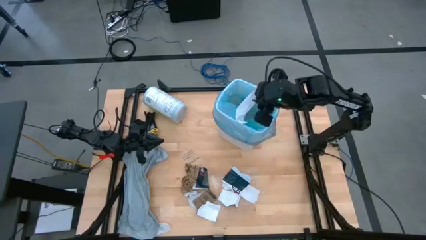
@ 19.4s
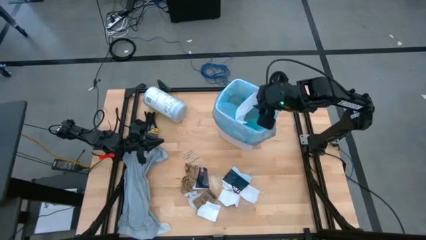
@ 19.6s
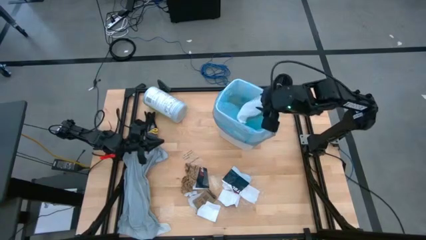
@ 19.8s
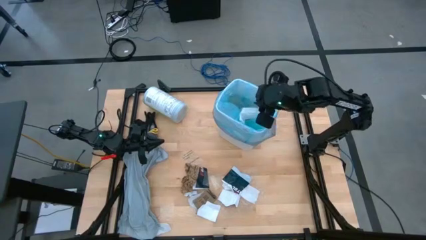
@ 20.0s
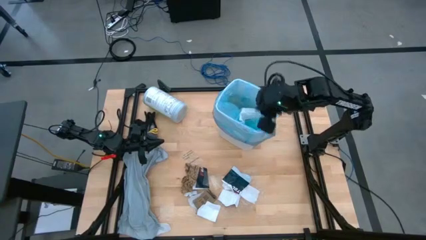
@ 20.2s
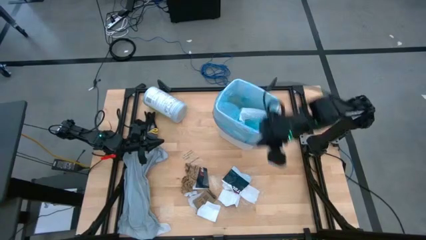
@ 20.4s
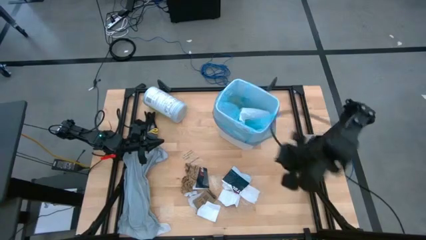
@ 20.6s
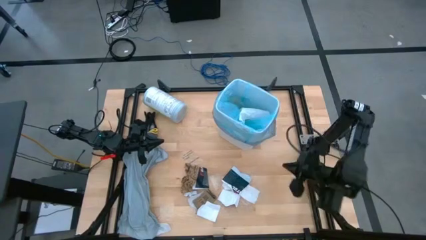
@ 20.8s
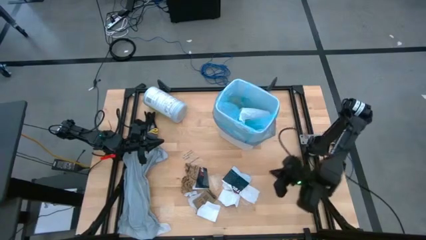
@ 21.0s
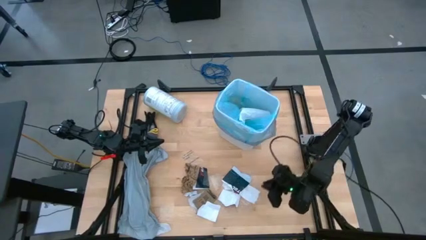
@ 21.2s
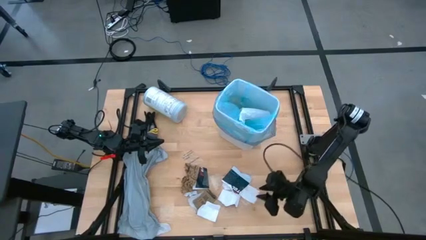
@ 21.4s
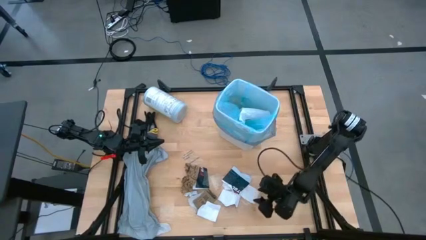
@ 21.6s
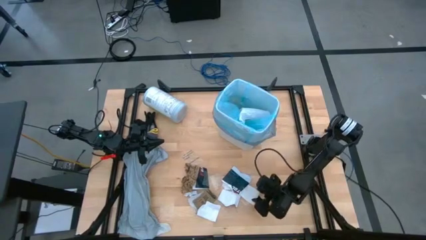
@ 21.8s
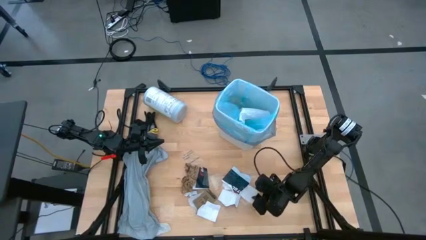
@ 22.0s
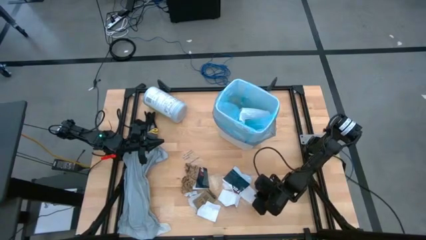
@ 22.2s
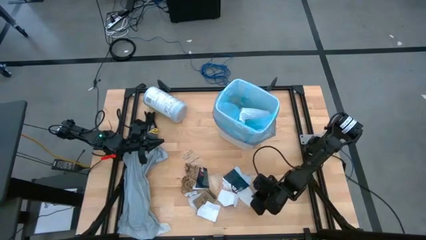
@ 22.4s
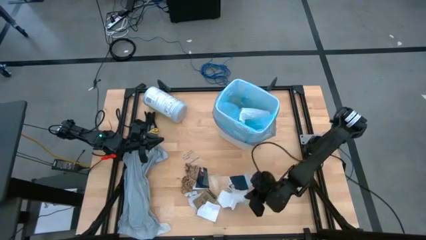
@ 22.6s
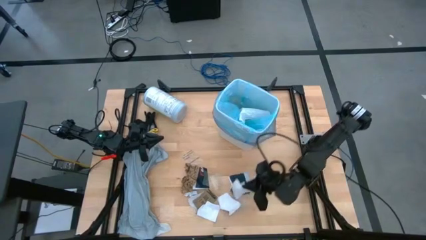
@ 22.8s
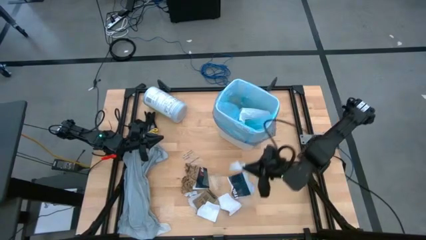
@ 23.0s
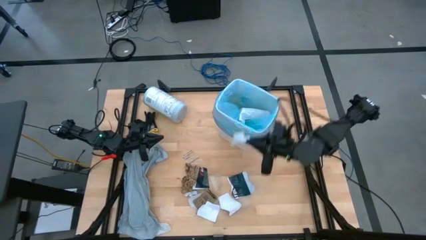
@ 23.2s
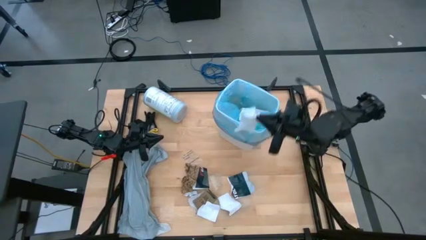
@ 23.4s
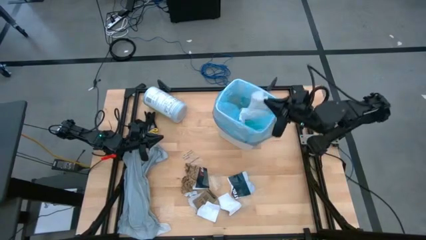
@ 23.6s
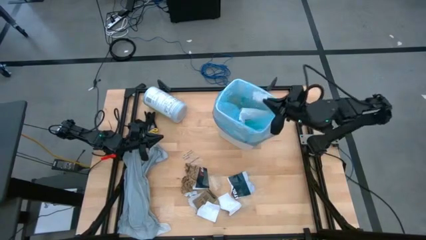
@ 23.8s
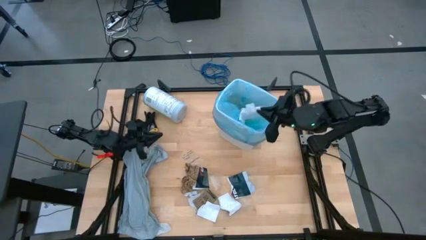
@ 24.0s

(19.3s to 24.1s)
Task: place trash/remove bag and relplace
Put the white napkin into the trash bin

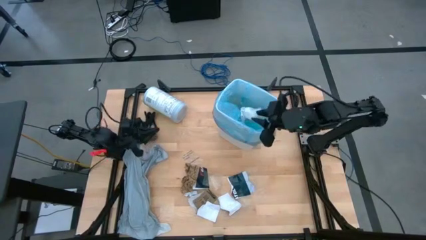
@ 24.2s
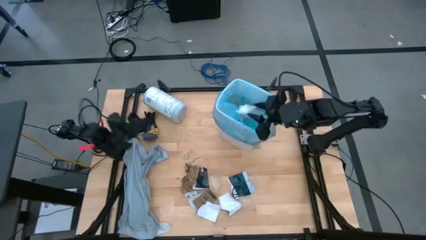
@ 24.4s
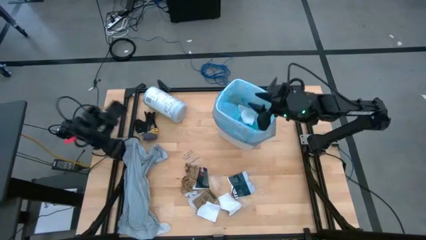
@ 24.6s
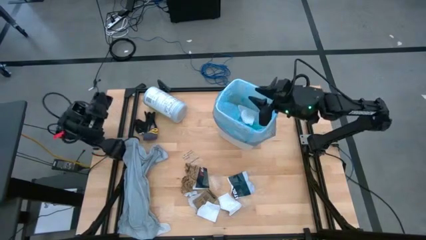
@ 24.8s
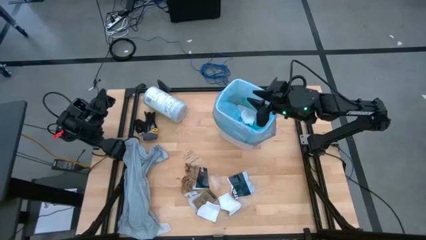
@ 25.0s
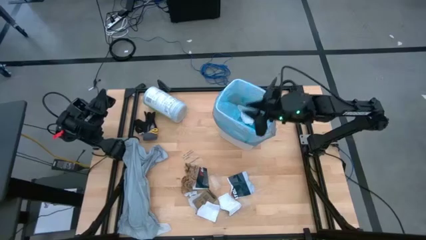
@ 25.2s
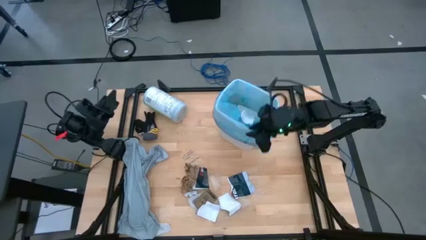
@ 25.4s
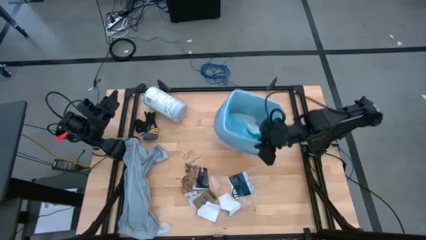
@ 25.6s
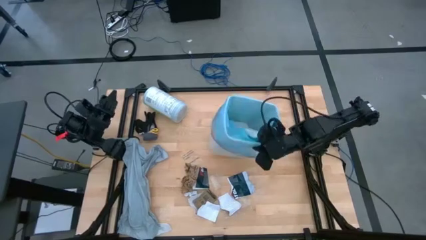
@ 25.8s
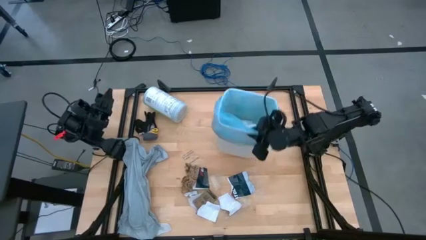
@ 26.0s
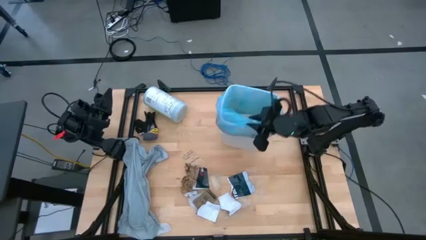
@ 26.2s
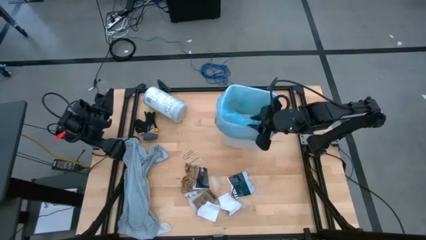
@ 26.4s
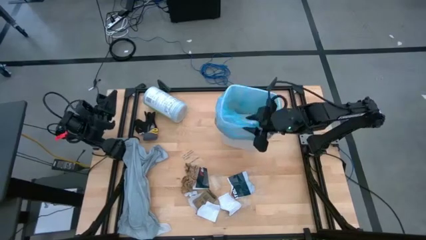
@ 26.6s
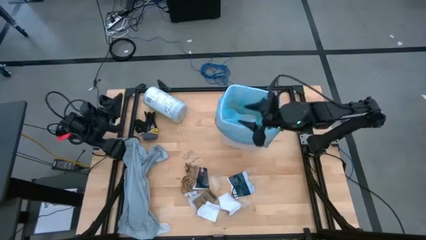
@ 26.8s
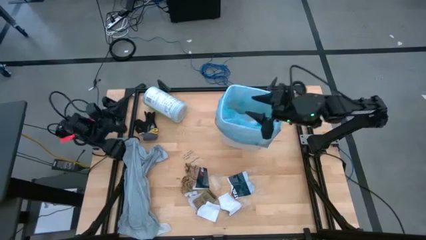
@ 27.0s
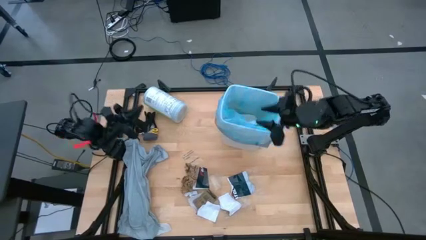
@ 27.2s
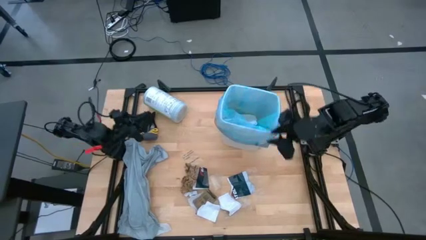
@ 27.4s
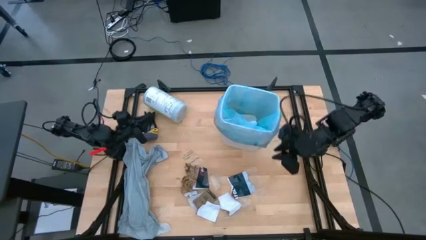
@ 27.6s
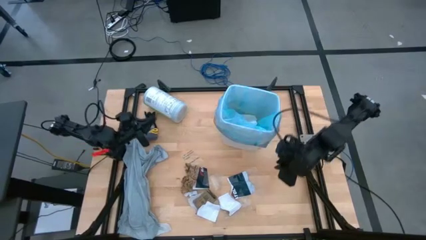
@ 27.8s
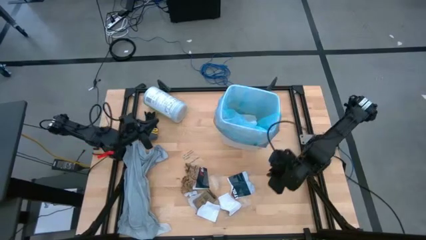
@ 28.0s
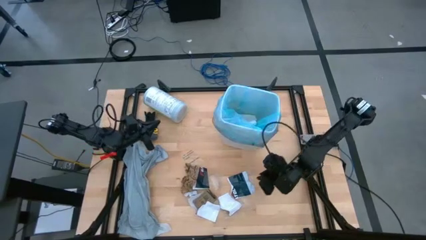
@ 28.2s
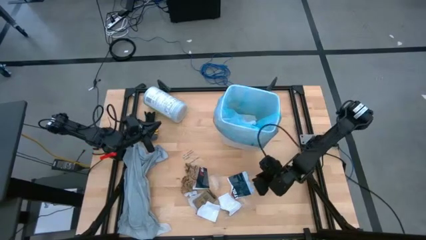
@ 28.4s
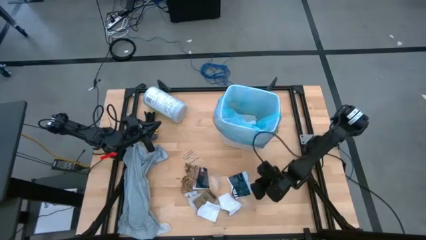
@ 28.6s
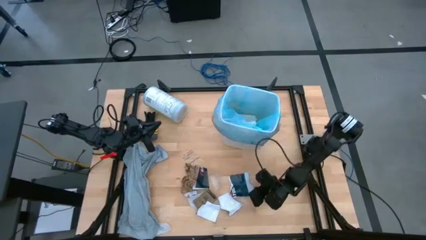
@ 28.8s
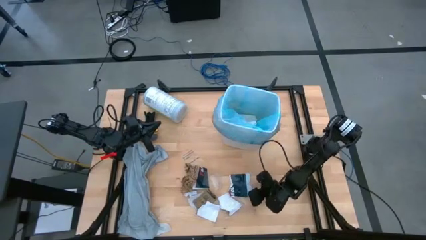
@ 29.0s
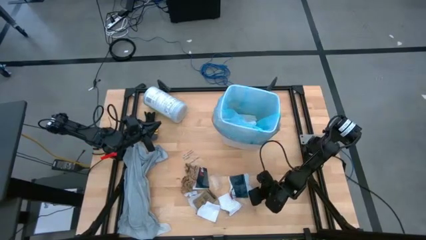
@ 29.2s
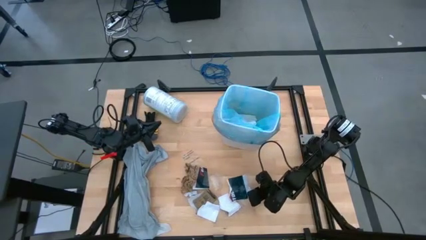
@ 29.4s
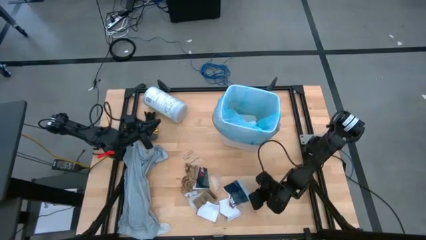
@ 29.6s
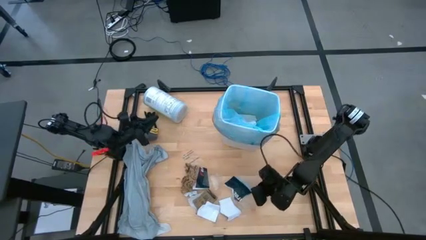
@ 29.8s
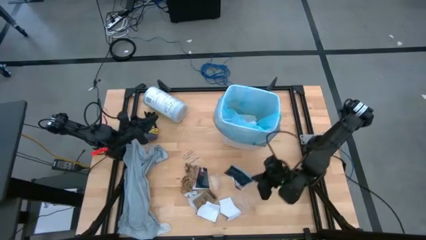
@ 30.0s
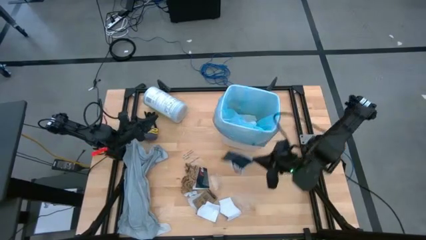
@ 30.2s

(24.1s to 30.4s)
Put the white paper into the trash bin

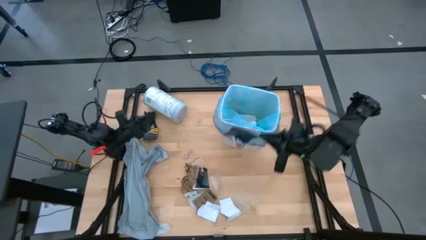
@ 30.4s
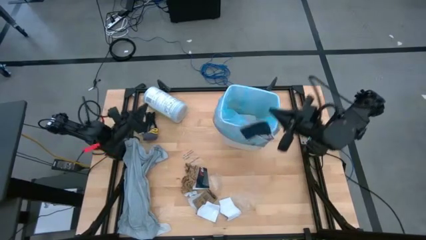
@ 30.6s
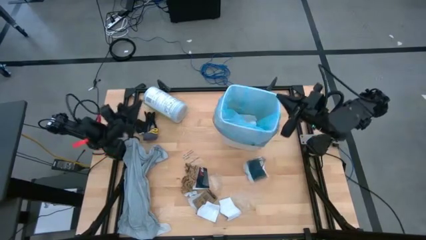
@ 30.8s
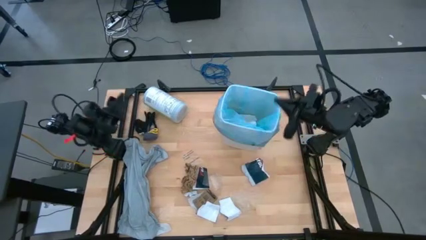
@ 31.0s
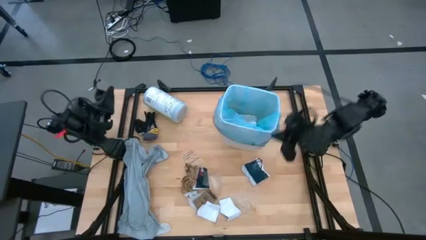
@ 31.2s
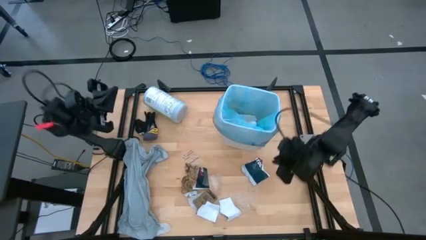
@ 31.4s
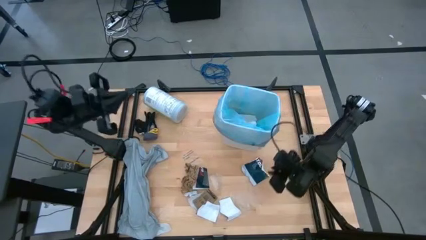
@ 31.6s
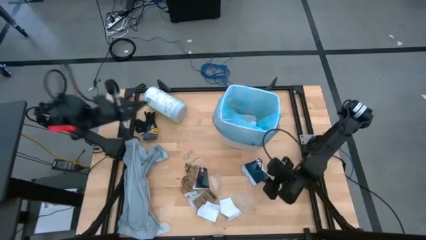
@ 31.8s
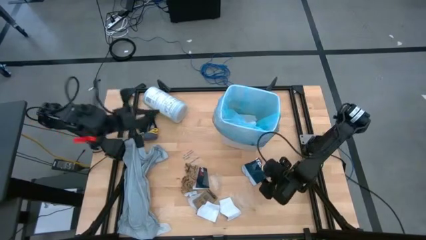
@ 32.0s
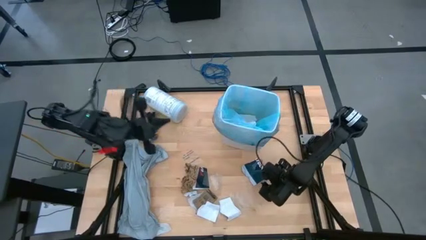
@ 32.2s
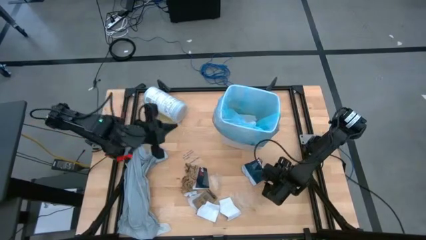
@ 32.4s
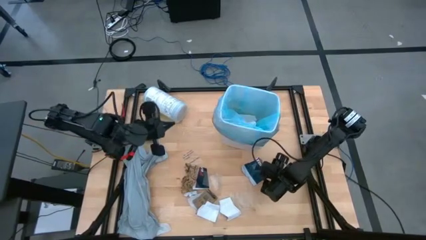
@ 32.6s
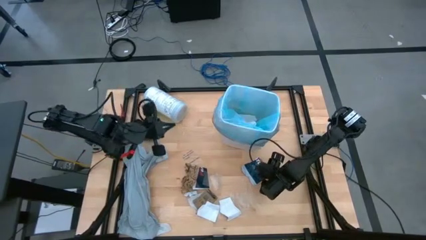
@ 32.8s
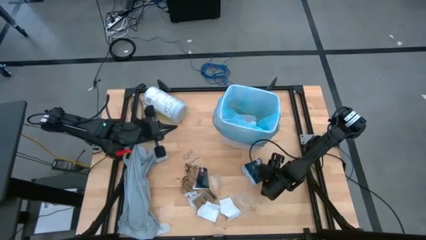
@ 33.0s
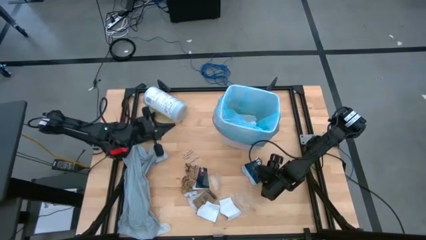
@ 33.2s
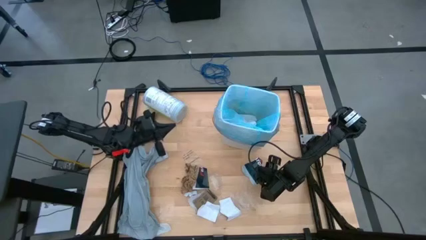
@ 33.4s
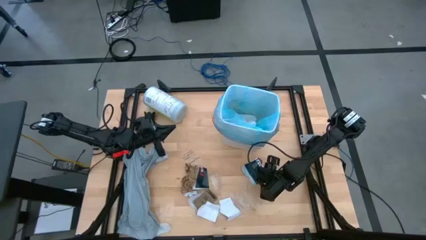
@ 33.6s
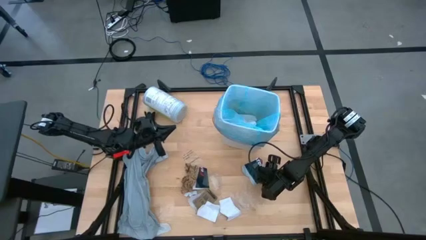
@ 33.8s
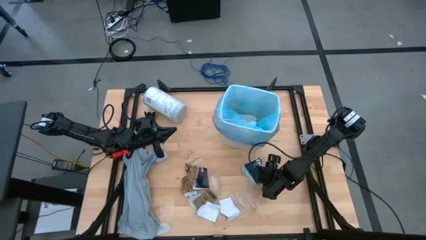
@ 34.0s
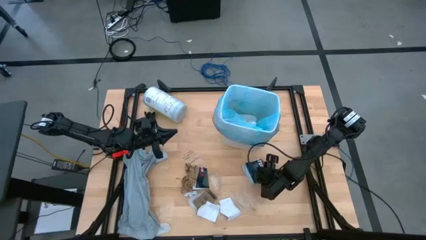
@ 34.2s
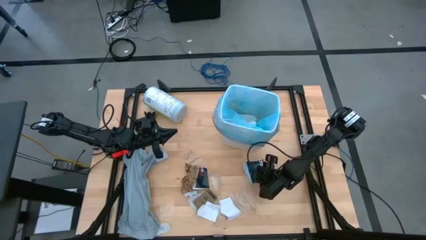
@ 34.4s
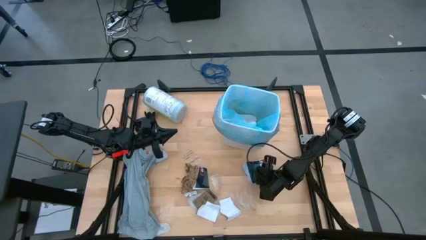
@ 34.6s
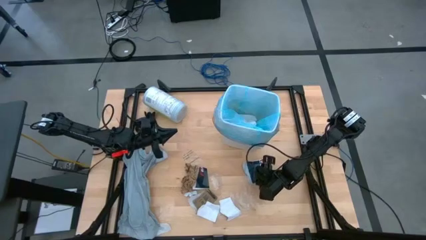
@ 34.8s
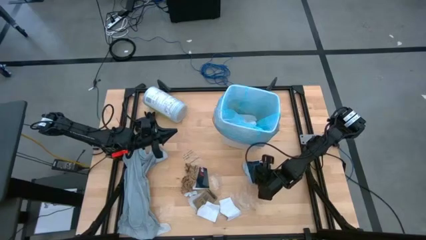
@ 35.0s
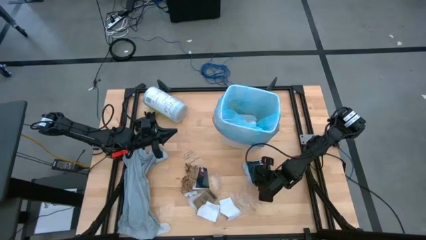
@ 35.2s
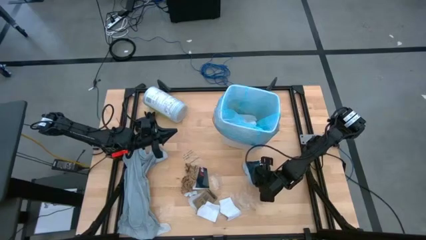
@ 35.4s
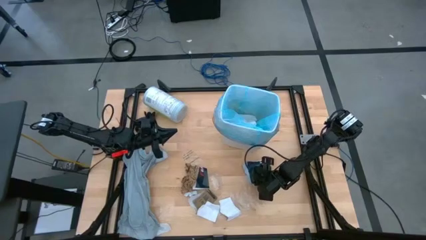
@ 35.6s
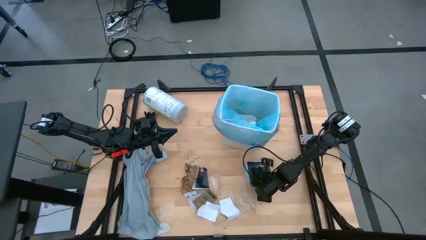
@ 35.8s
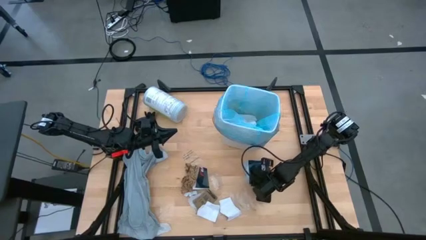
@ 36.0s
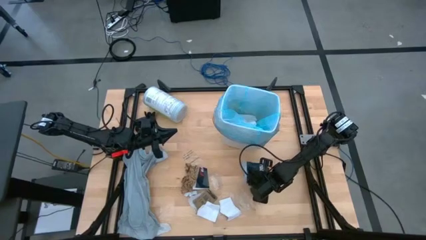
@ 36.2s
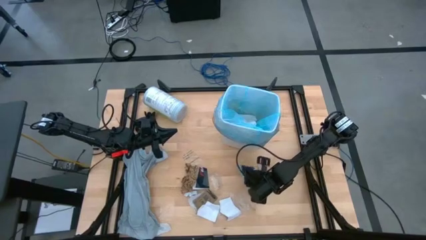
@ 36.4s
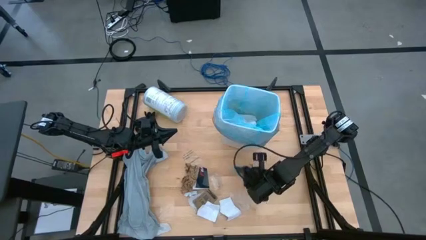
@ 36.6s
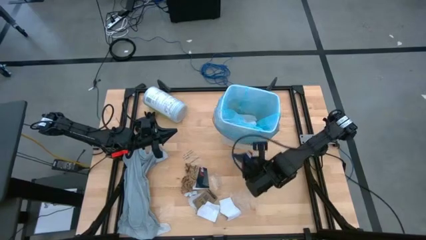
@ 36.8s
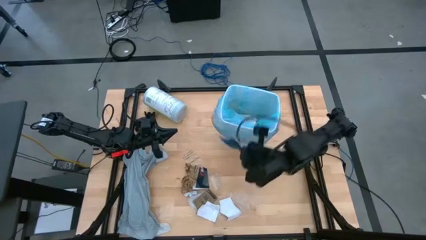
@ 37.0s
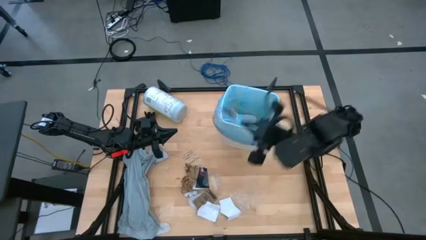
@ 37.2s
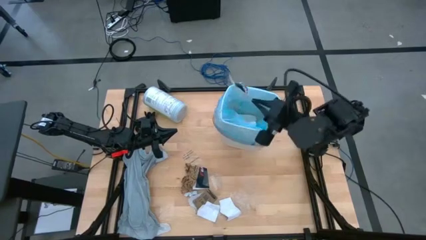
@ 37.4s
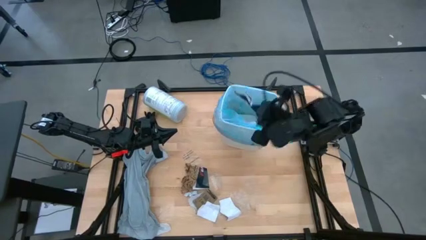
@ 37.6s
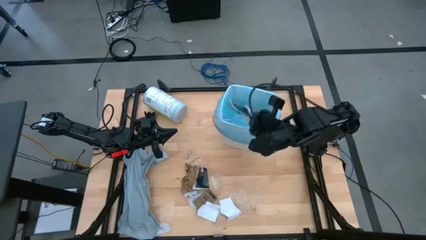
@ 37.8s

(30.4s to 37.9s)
Put the white paper into the trash bin
